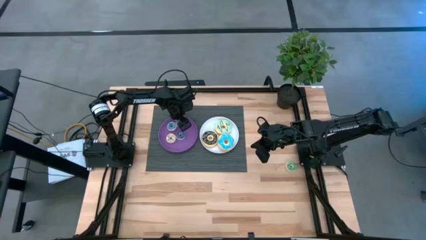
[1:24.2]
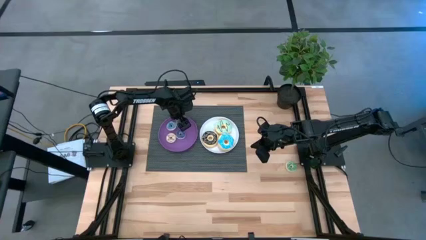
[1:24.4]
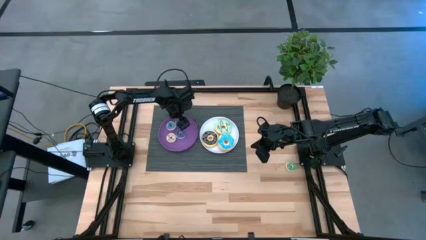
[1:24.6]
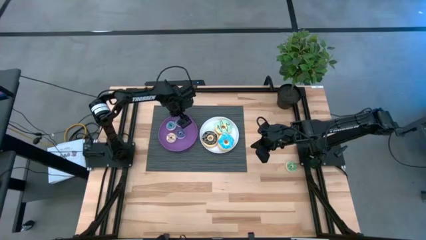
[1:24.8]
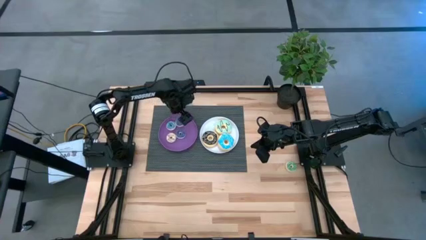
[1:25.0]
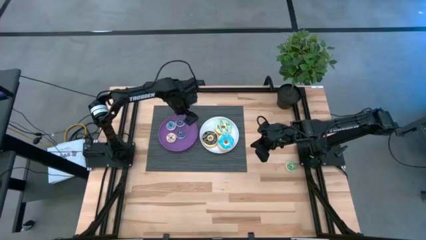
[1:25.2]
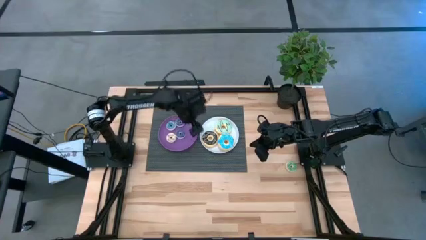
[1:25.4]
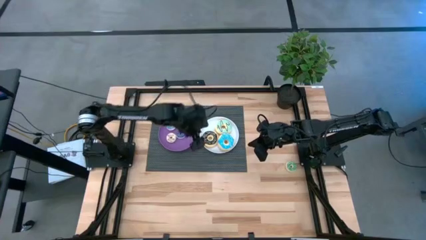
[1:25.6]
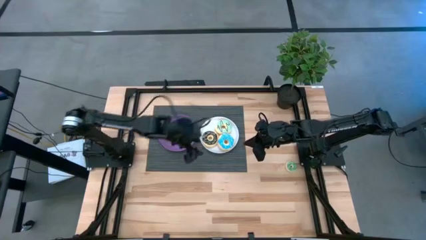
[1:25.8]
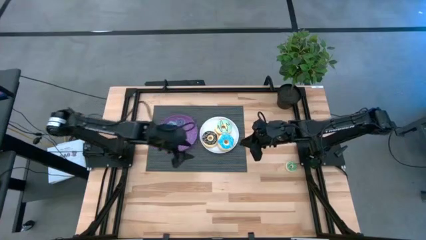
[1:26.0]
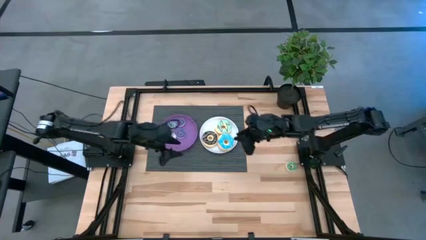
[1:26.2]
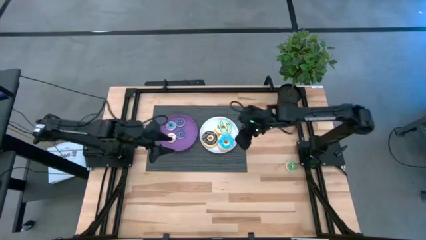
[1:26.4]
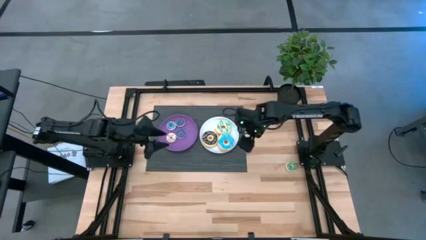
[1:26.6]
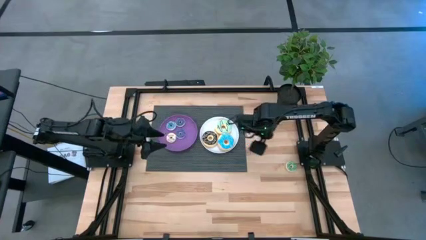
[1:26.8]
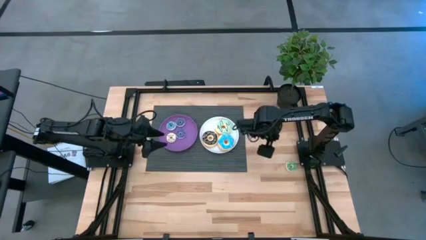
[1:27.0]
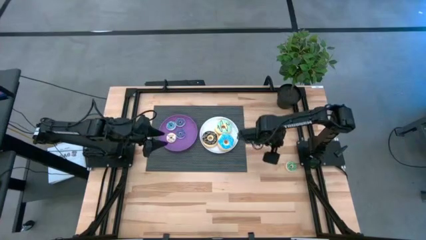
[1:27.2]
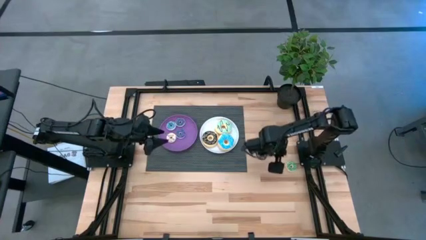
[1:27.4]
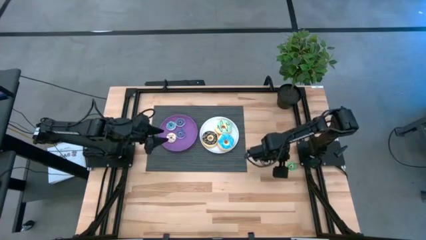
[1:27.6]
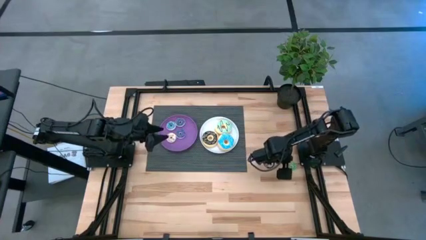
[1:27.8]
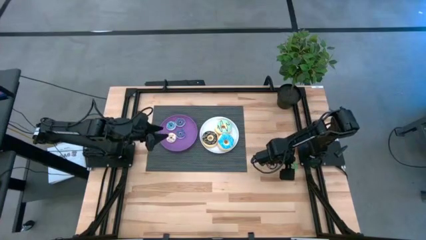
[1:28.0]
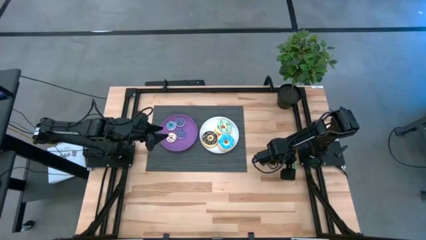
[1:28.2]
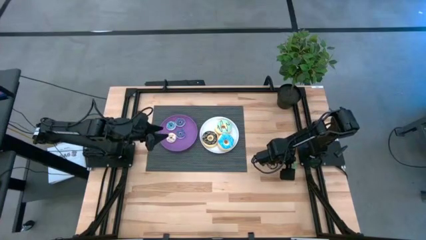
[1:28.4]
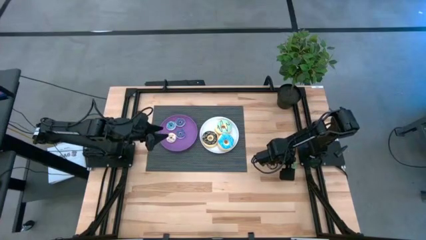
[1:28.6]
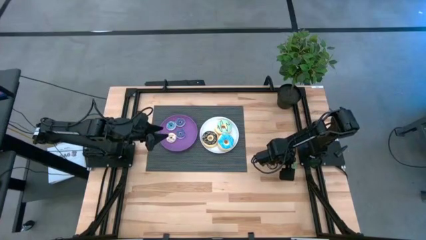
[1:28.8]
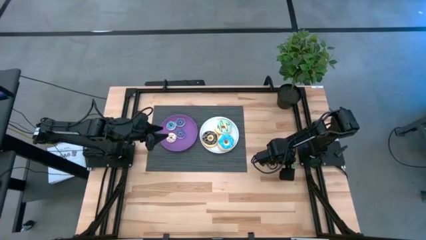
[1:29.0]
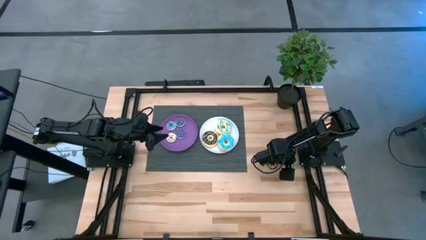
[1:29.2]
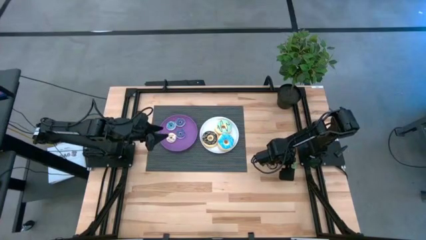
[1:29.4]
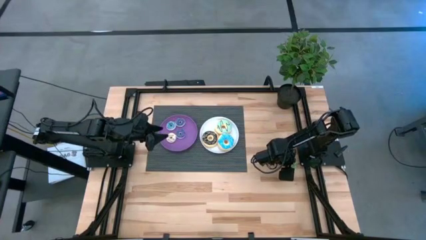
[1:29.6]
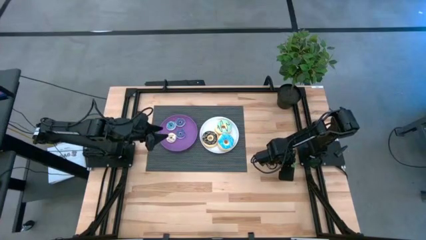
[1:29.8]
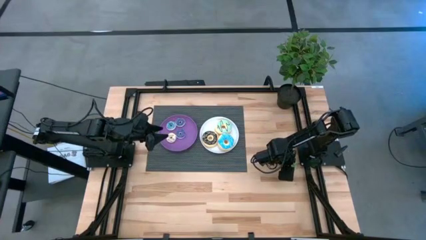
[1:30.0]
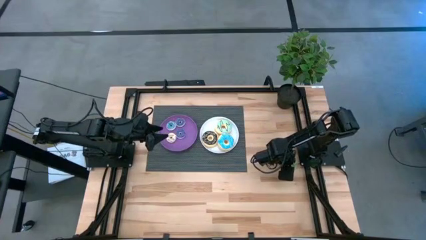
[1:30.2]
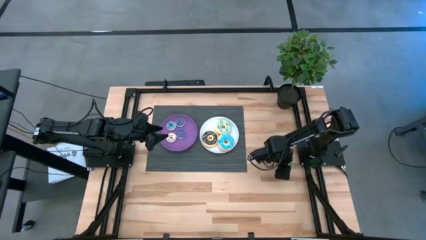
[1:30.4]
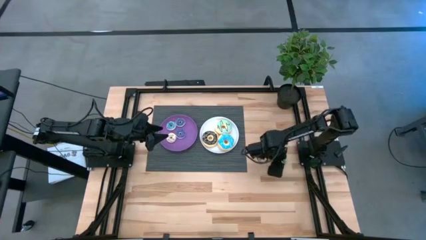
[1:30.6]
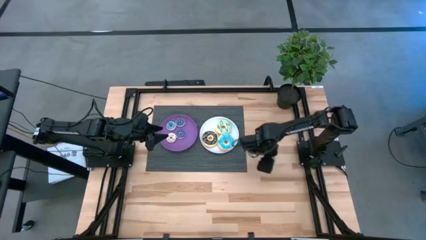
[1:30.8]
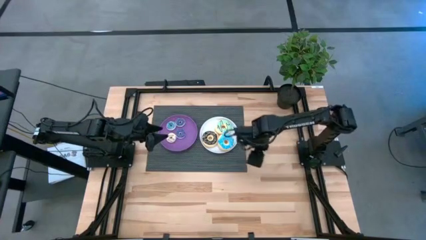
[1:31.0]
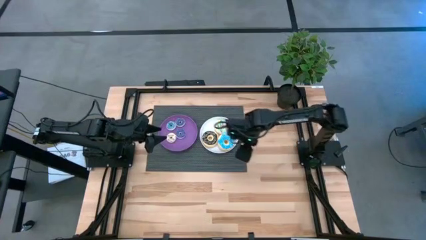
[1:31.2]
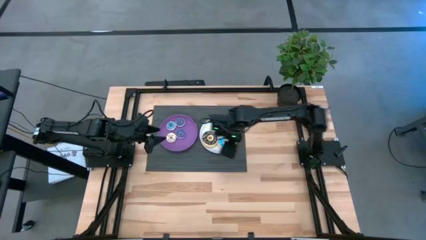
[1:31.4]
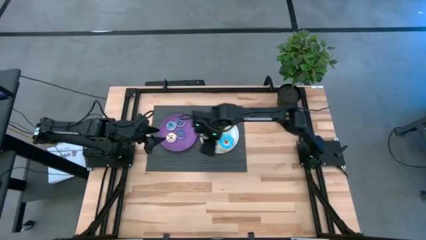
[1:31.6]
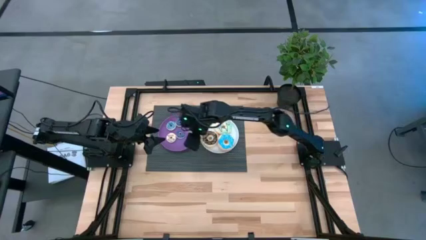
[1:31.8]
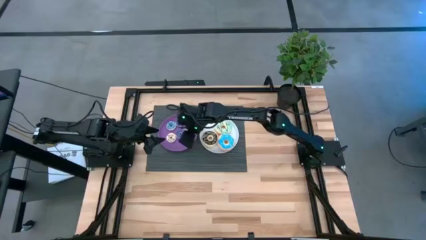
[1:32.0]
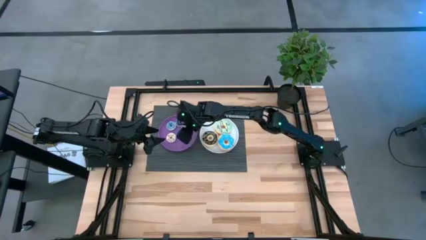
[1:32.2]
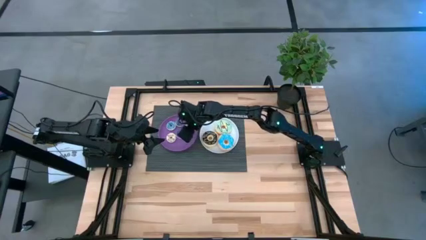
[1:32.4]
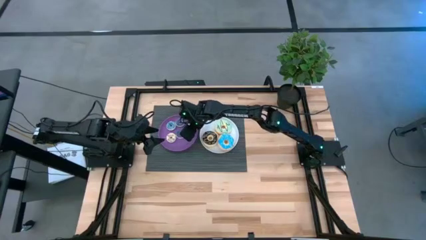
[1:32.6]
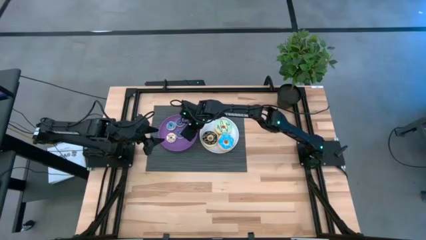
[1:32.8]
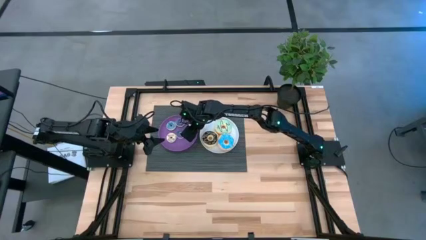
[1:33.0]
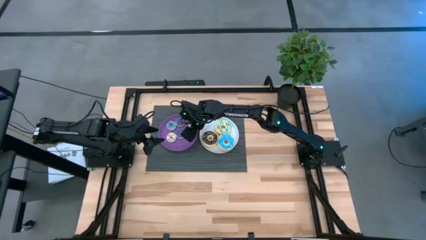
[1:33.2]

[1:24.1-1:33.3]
Task: Pick & Place donuts
Put the small green donut on the purple plate

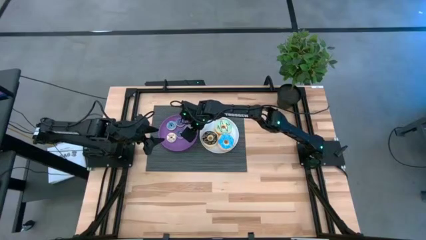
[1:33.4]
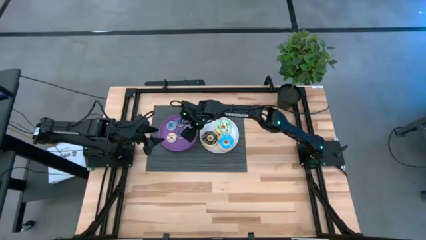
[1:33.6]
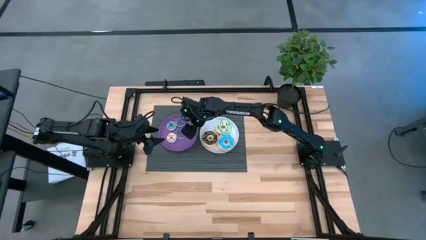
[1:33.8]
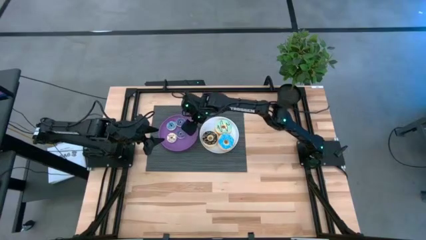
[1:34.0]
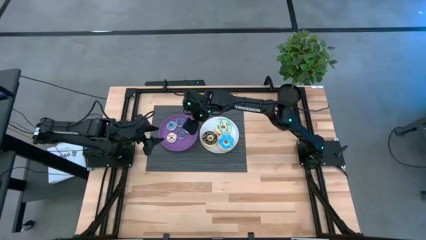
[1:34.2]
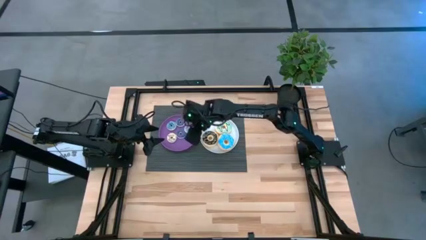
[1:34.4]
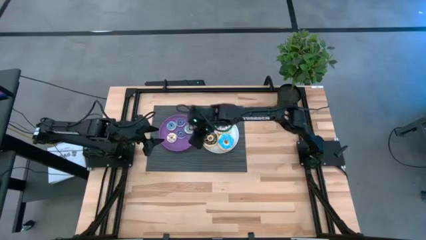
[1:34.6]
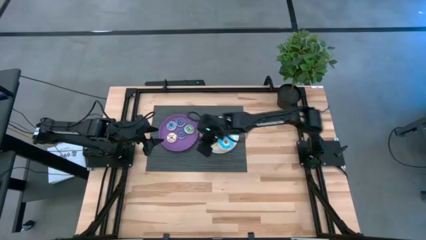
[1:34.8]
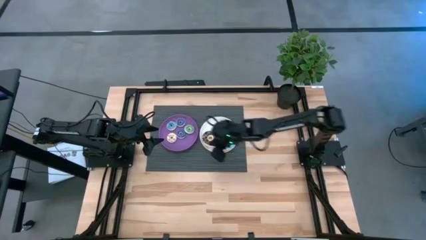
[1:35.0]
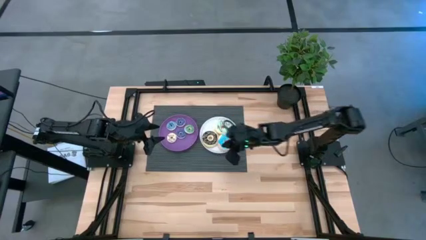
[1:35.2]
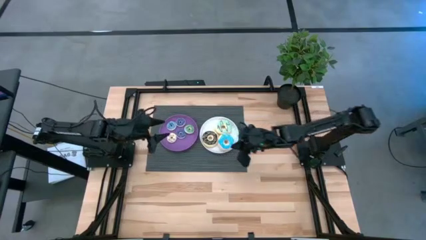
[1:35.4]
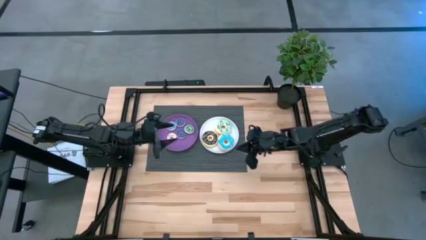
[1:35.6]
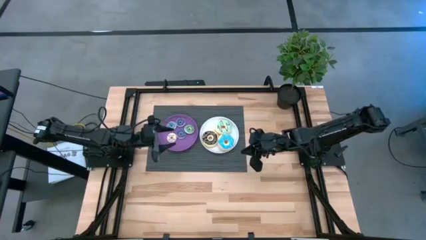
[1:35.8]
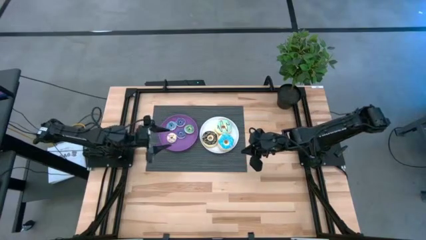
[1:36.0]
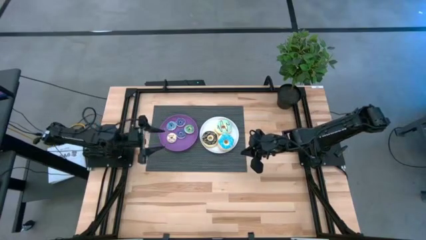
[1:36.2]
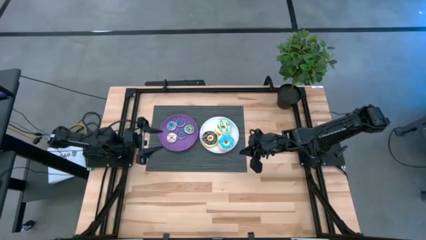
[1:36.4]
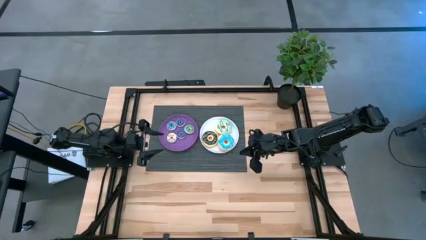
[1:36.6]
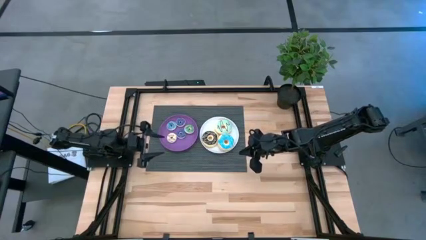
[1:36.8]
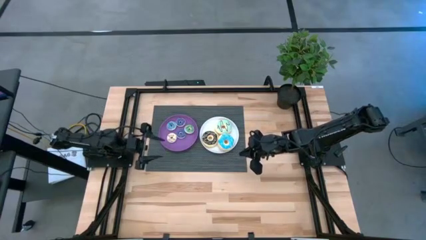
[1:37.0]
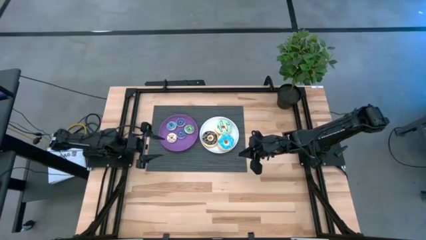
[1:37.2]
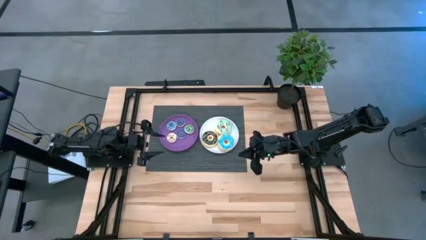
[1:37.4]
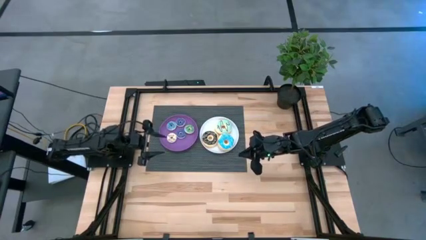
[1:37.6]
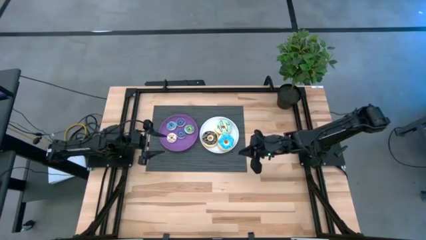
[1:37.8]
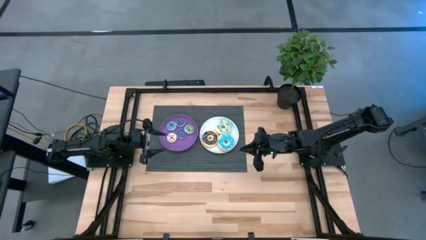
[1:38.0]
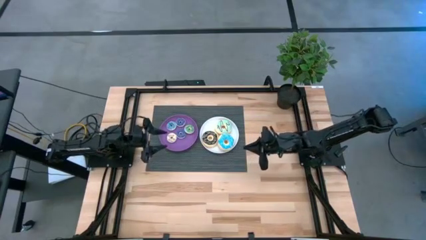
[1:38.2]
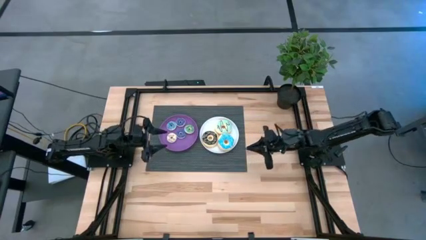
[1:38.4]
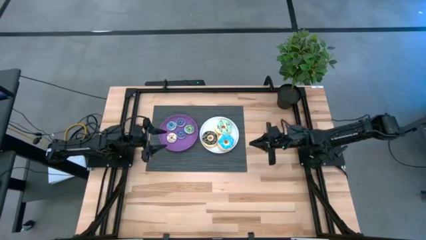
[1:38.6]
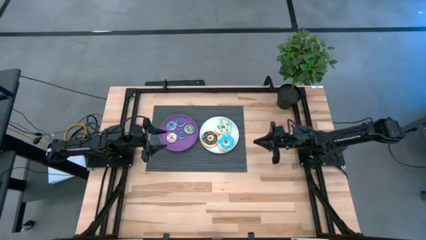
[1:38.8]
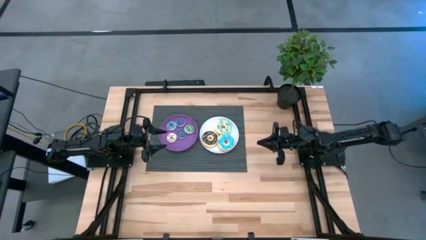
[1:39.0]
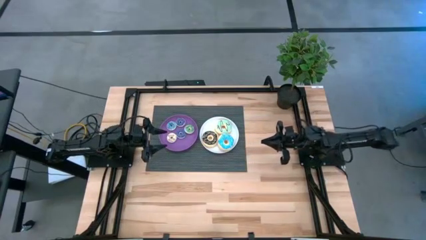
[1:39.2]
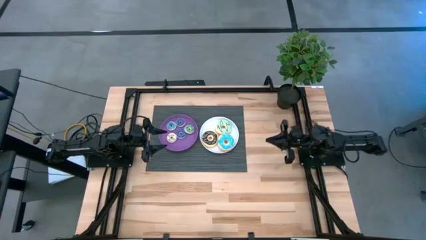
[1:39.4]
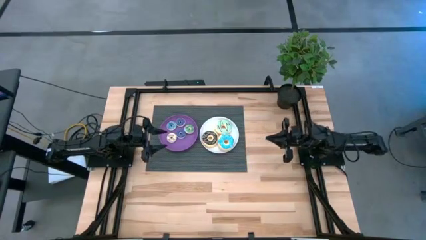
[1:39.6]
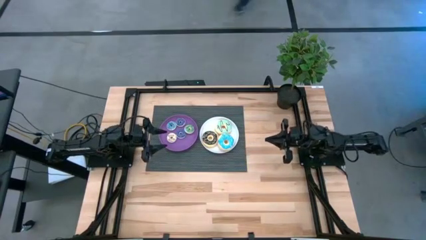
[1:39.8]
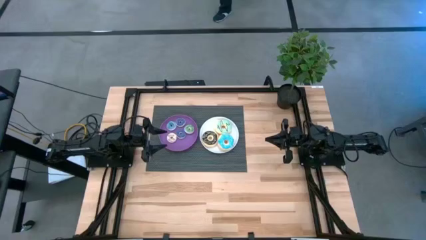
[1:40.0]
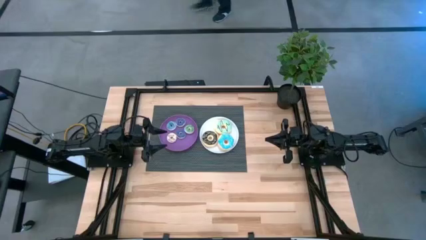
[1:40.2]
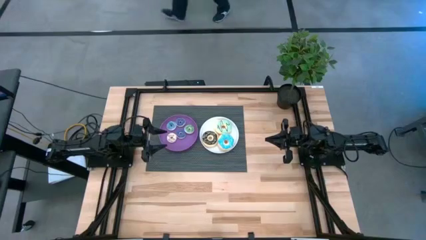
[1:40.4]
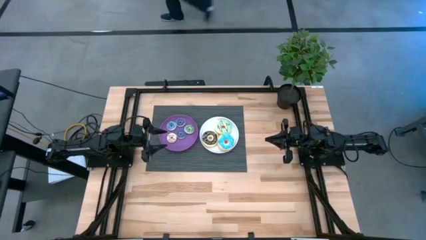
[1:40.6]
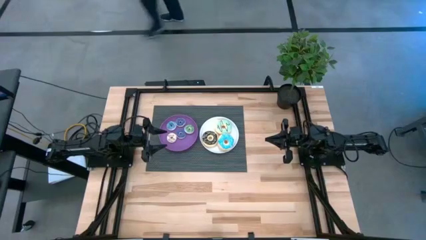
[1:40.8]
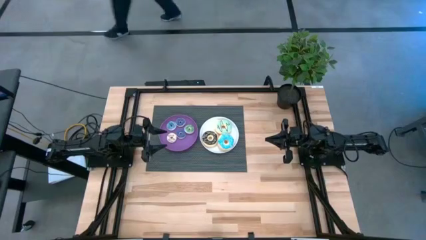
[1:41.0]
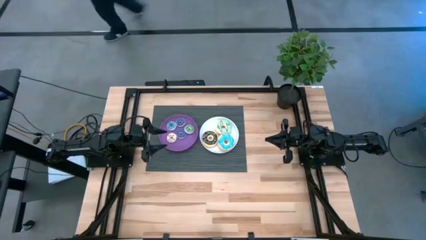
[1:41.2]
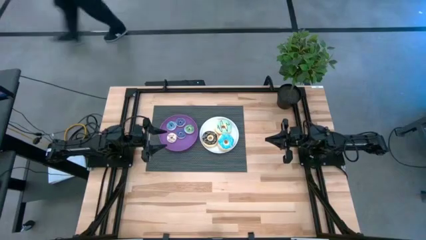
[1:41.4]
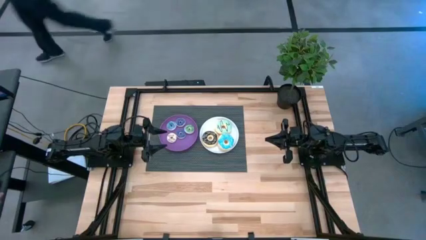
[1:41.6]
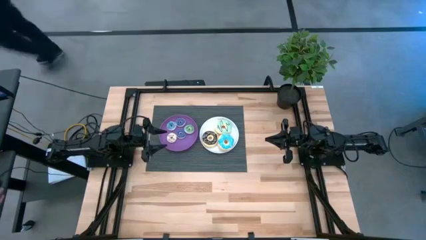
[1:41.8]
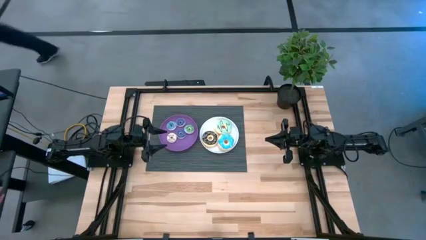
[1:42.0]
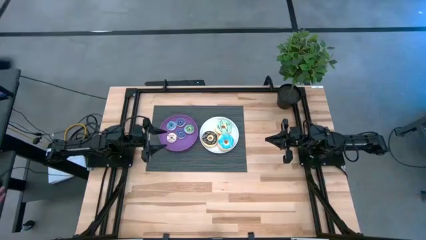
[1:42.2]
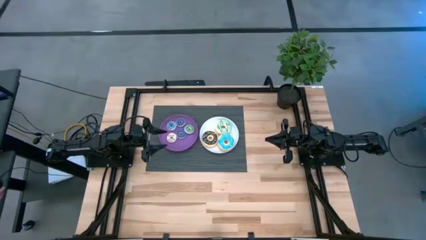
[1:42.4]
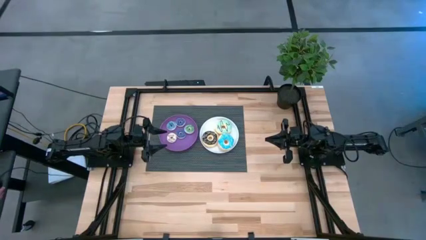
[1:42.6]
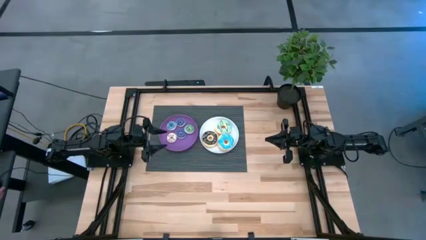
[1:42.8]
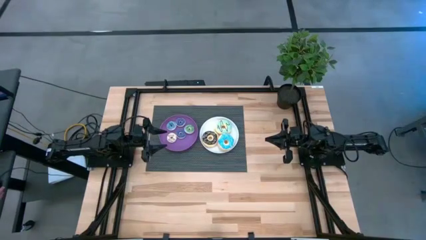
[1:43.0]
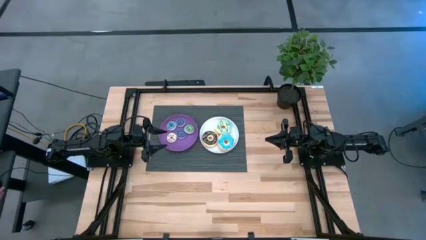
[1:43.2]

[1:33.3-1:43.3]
Return to Home Position
